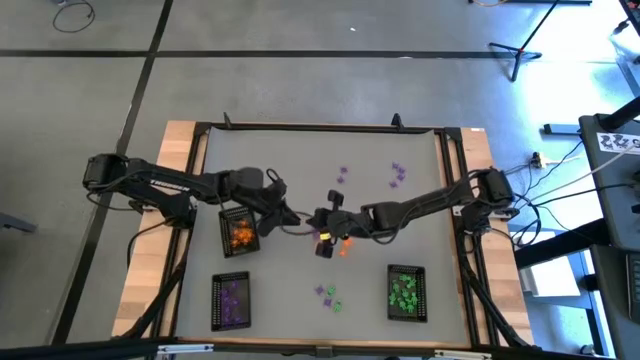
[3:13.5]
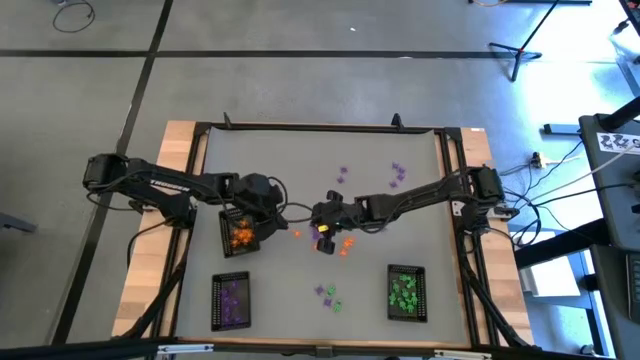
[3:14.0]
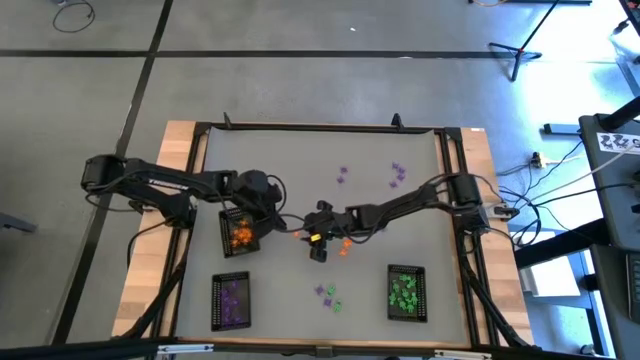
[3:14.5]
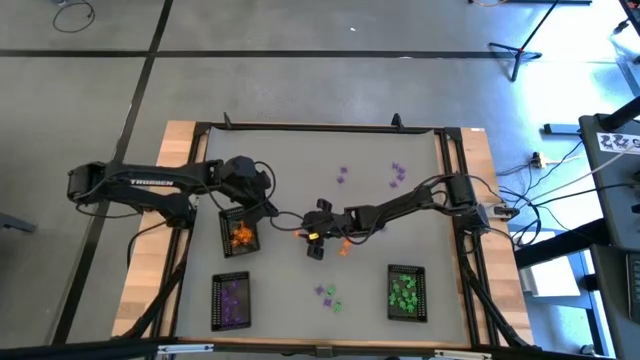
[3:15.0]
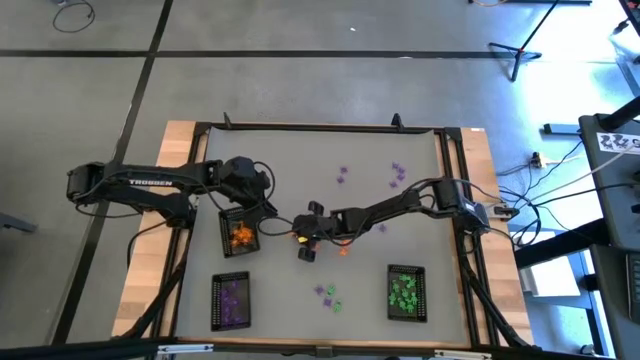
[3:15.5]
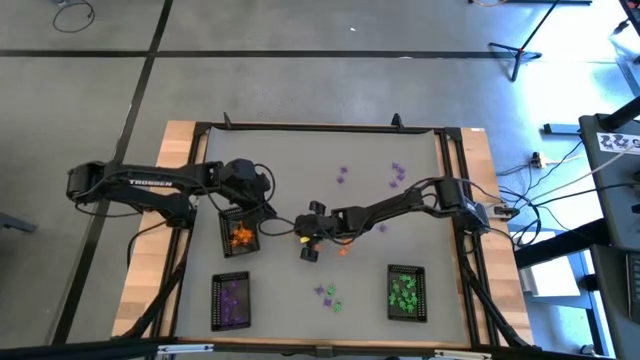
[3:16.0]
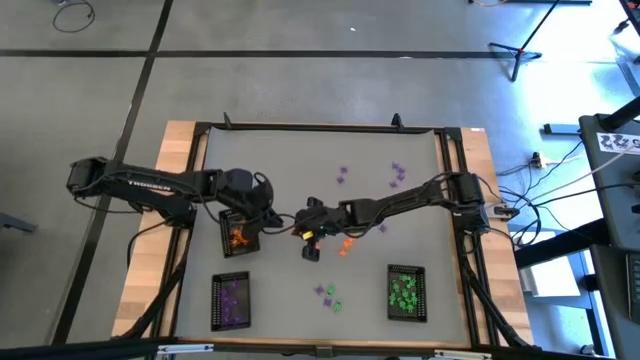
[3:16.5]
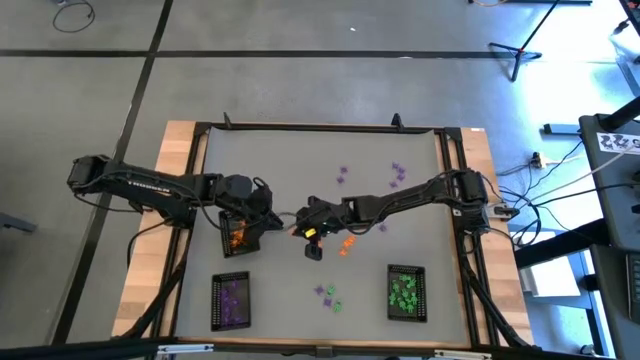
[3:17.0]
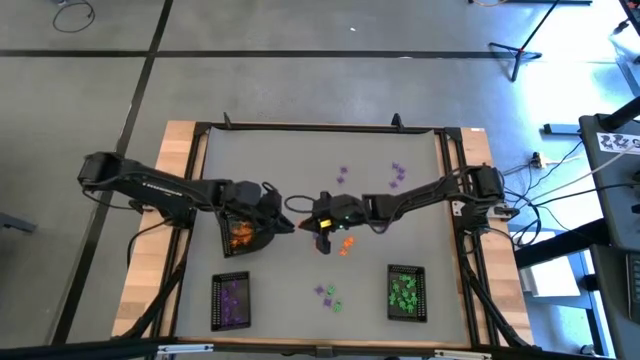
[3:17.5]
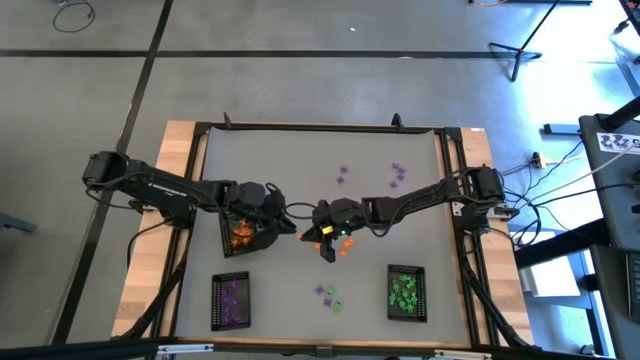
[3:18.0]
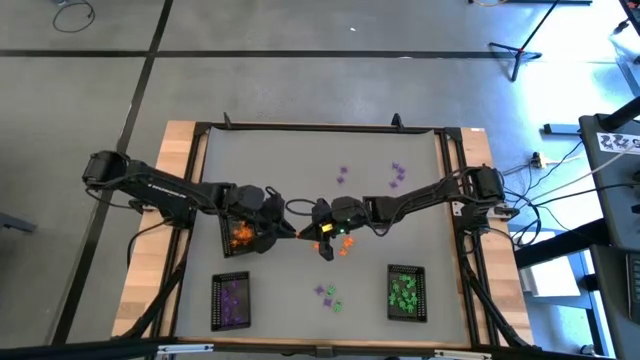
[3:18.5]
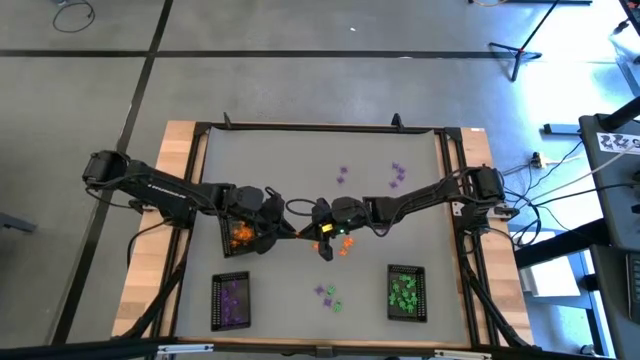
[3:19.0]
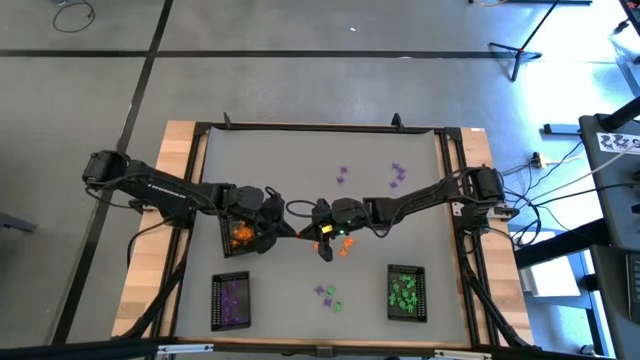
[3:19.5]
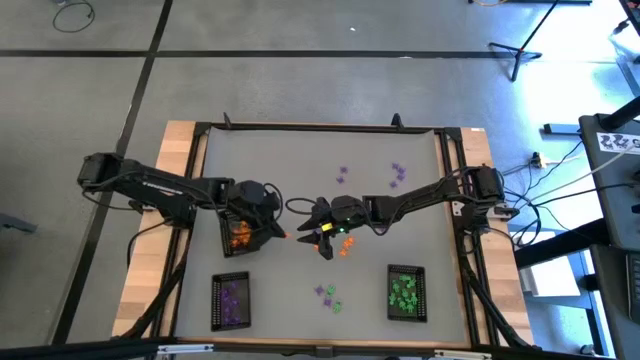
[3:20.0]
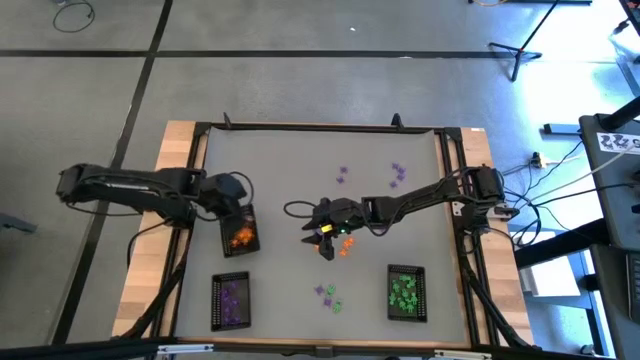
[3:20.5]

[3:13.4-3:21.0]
Task: Sort Halloween decoration
Put the orange spider toy into the top black basket

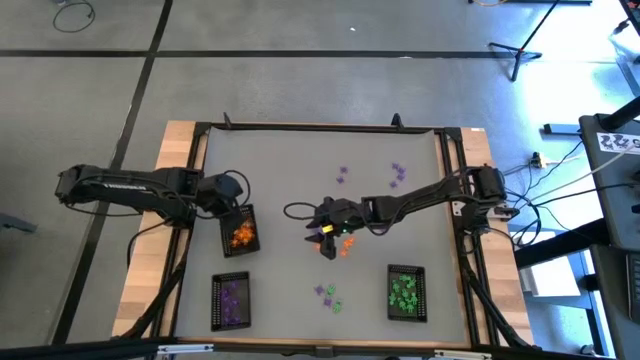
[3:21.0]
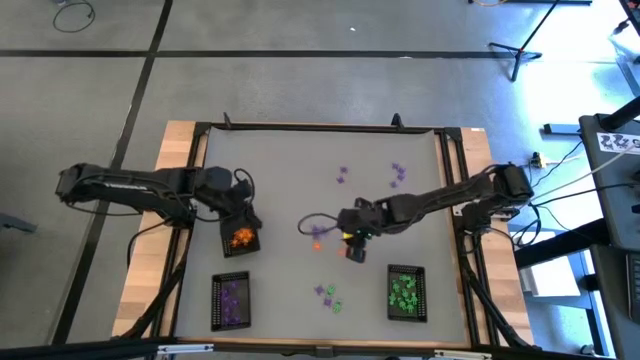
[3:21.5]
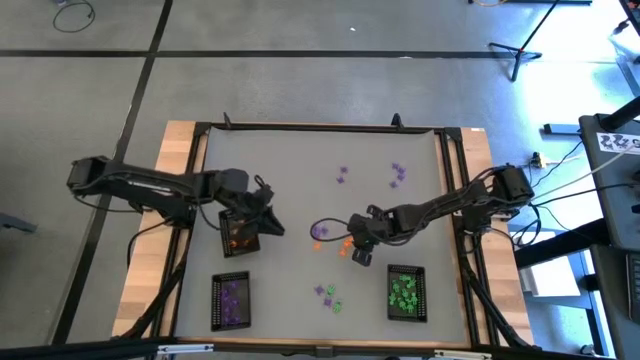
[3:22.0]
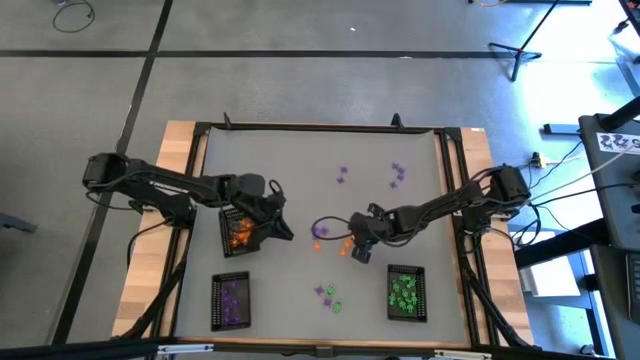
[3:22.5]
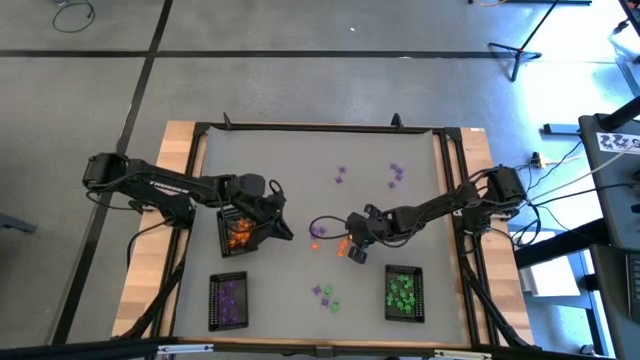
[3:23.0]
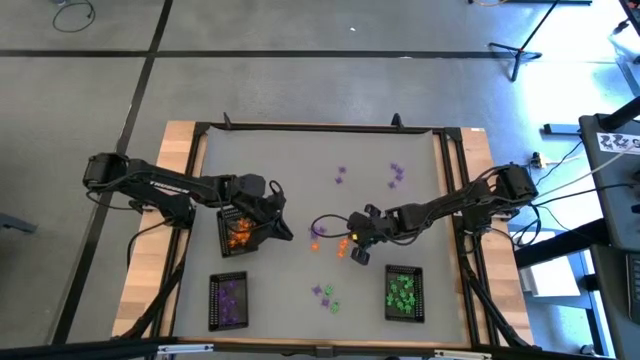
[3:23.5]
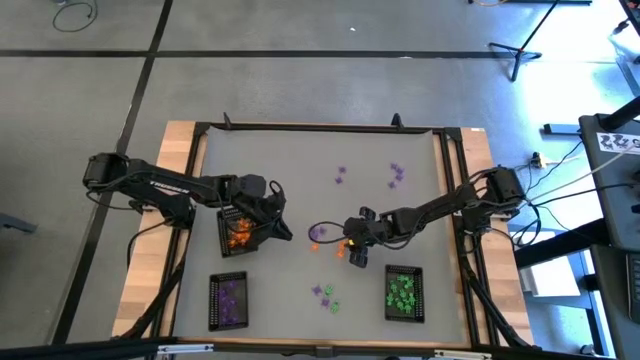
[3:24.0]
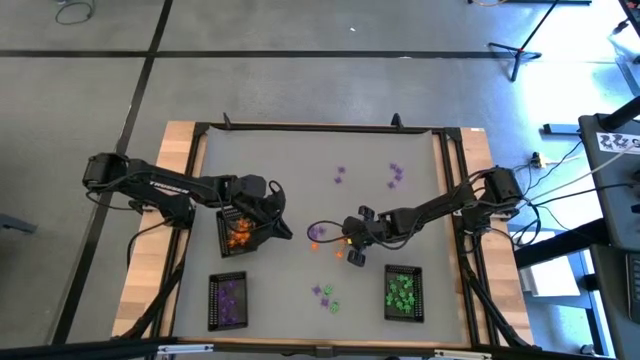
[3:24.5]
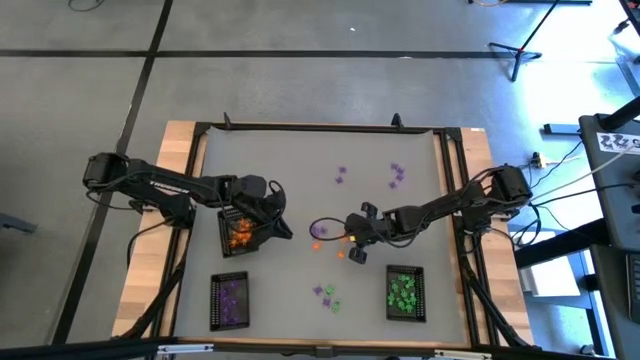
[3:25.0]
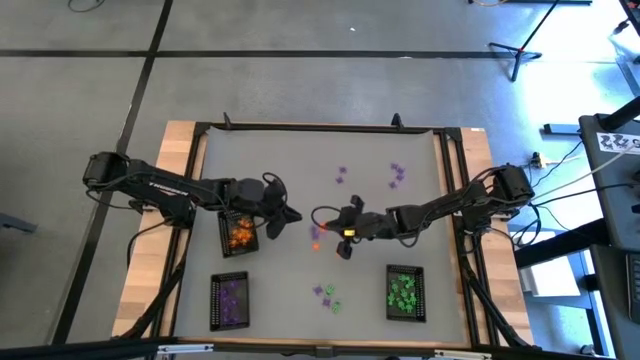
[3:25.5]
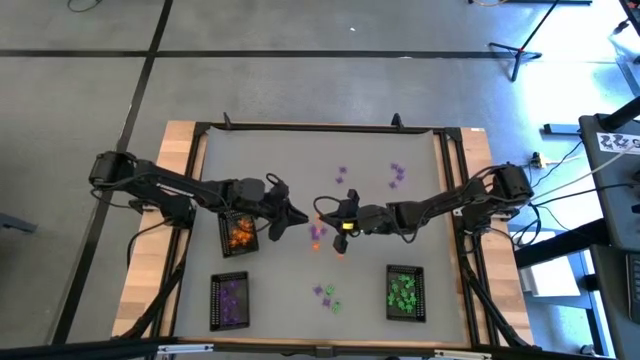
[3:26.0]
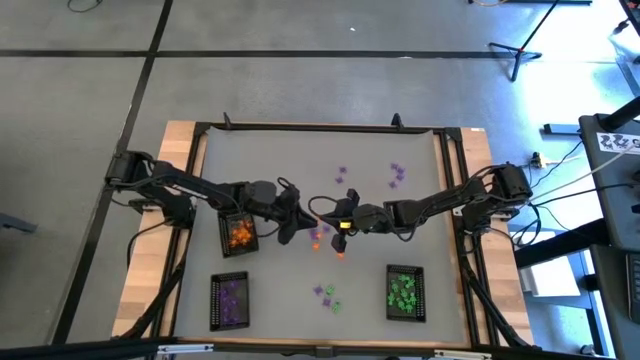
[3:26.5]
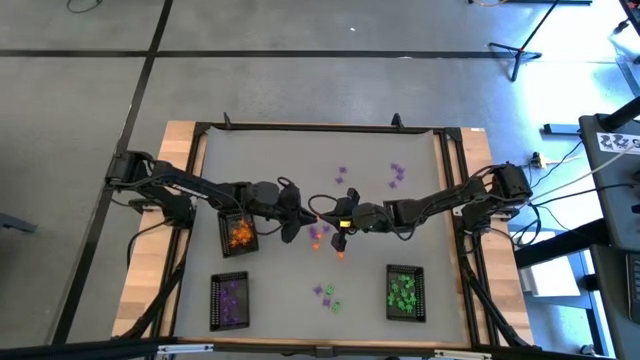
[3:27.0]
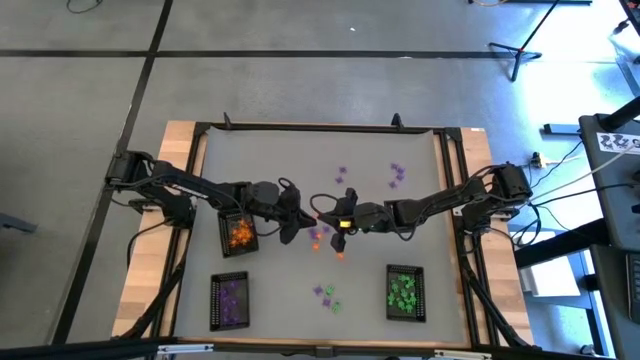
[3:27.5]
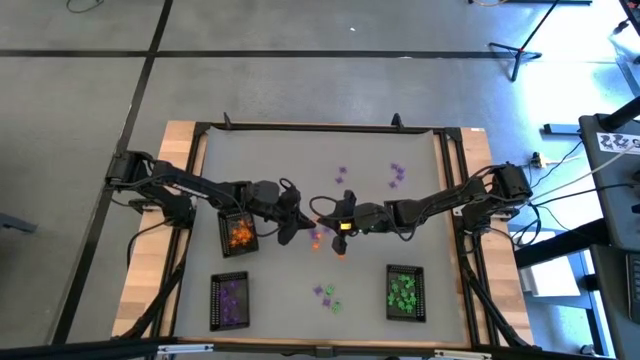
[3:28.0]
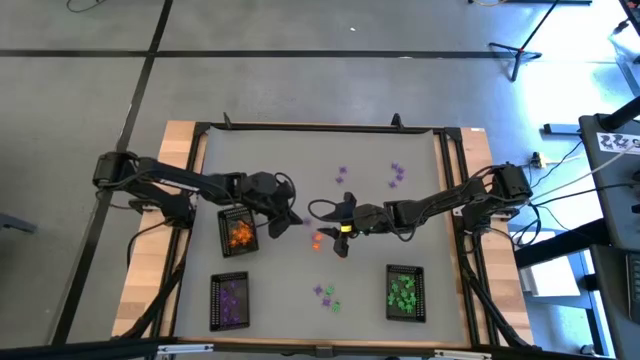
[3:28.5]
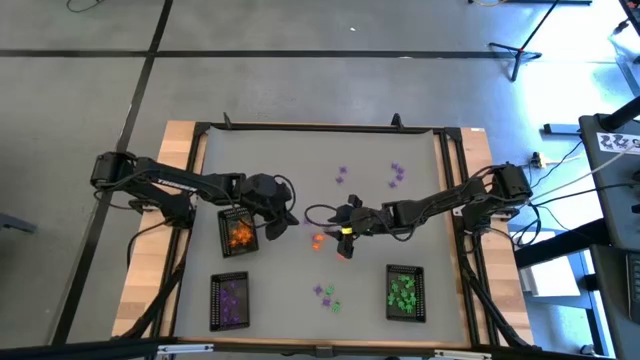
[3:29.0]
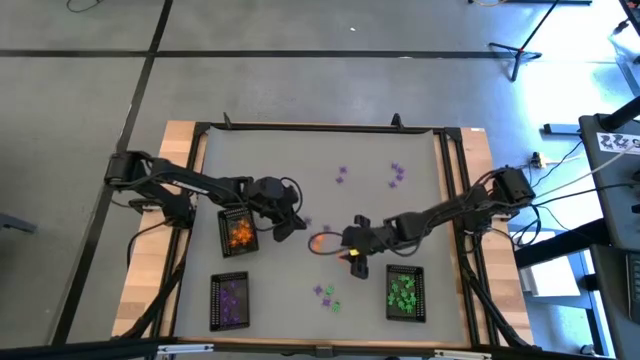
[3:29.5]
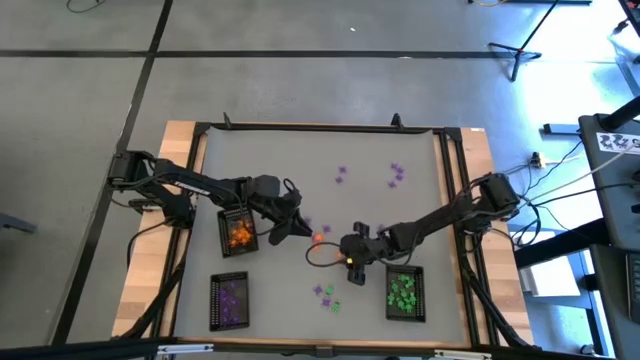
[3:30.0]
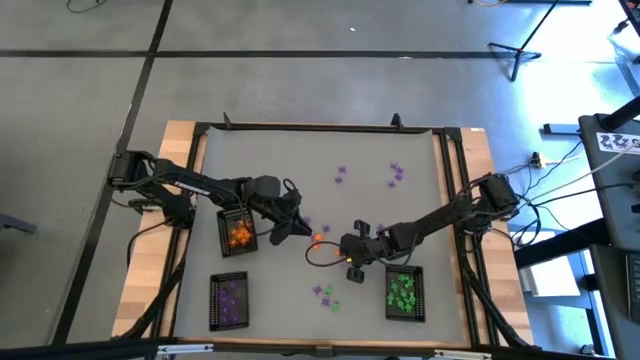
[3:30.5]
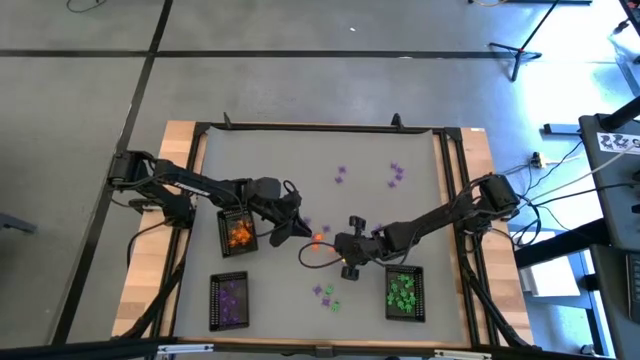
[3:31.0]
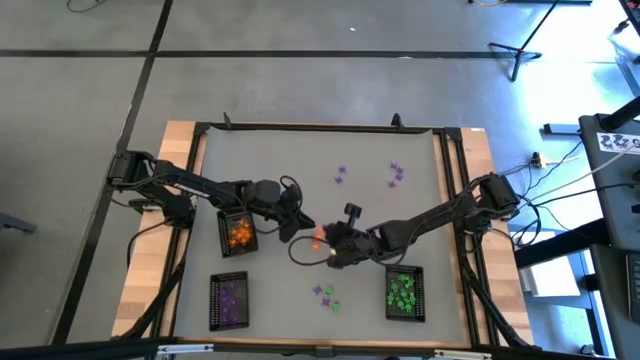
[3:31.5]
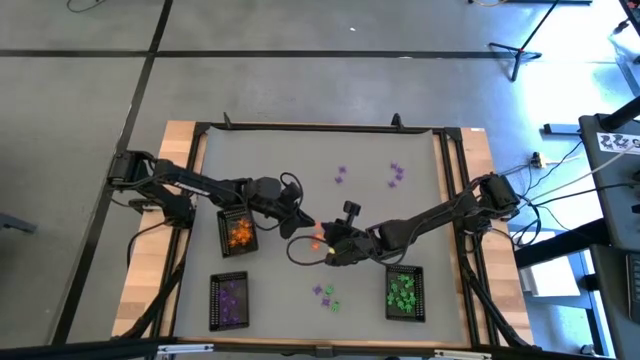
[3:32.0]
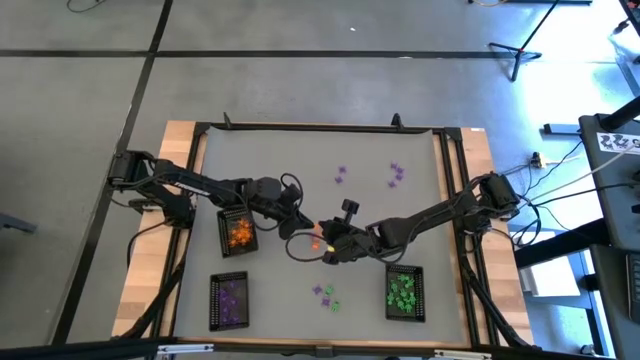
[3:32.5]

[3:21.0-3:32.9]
Put the orange spider toy into the top black basket

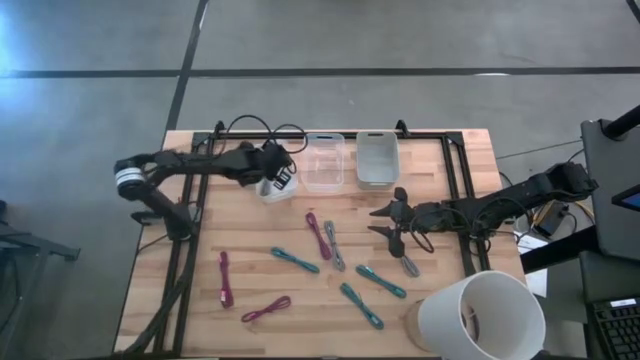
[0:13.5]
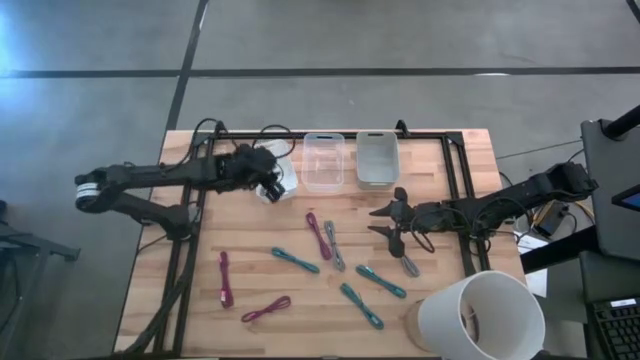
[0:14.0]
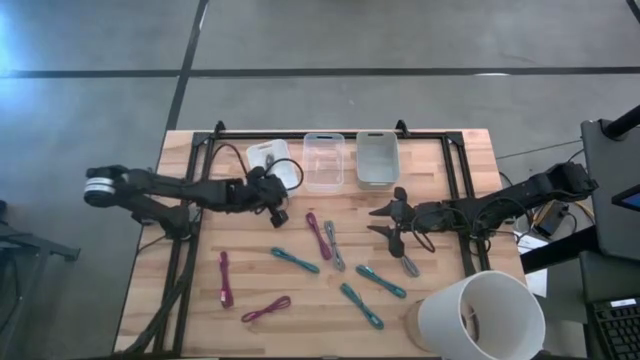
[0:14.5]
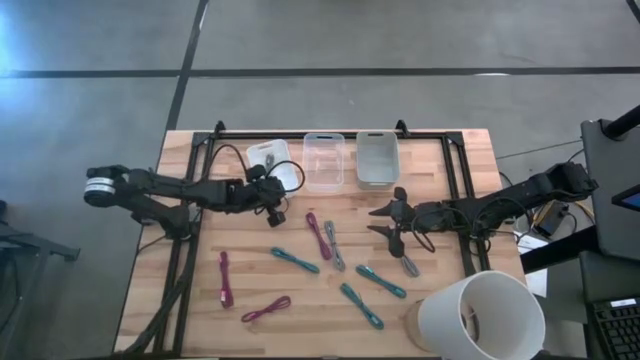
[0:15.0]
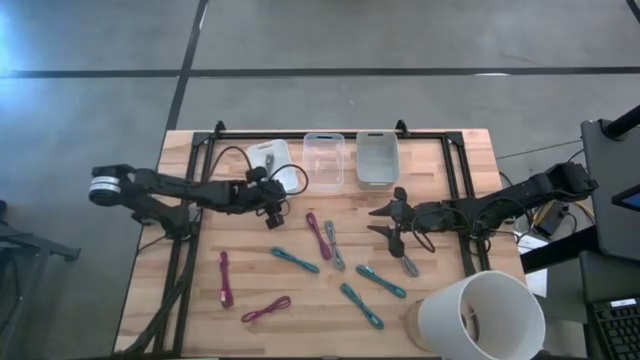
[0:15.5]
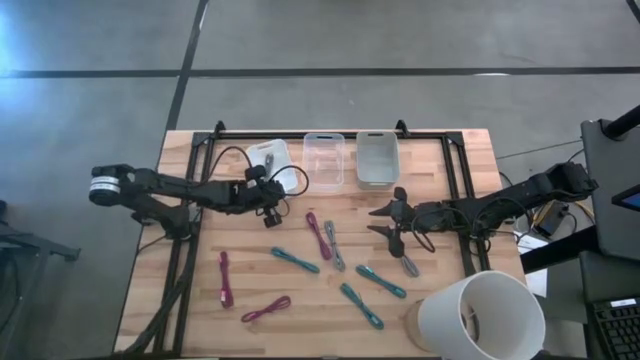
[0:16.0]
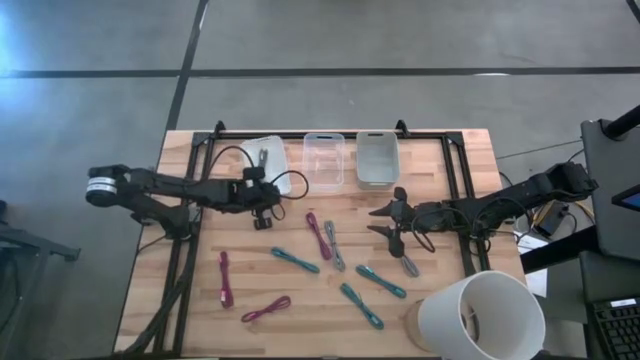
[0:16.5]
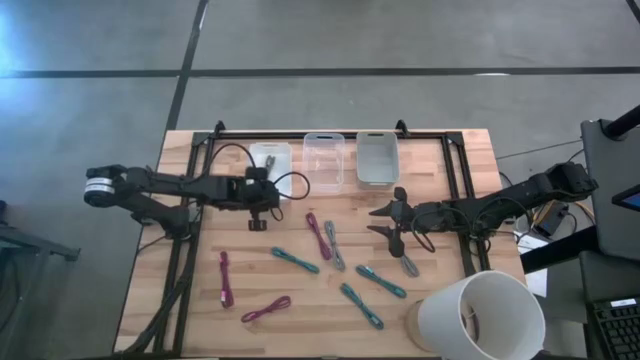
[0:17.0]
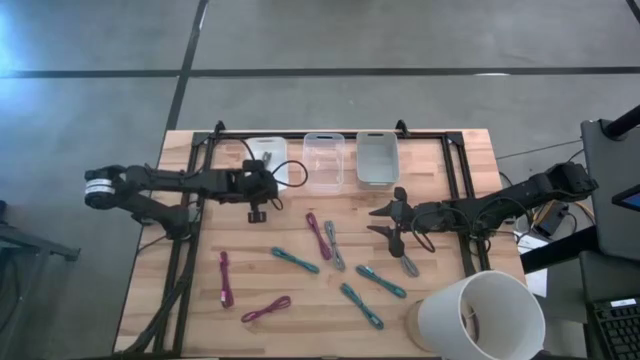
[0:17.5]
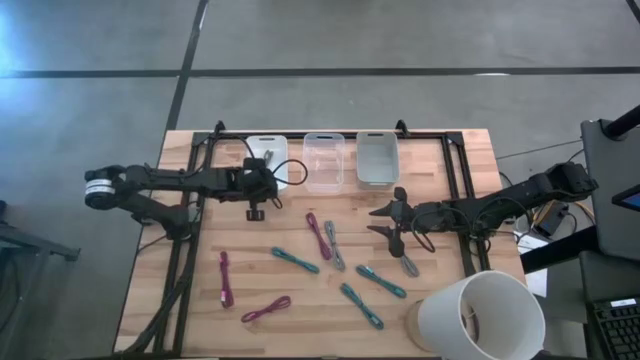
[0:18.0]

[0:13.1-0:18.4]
Task: Pick & Place USB Port
Adjust the white bin
